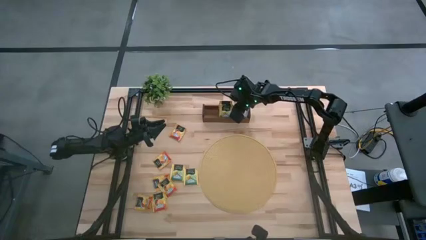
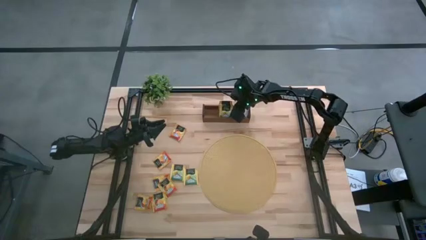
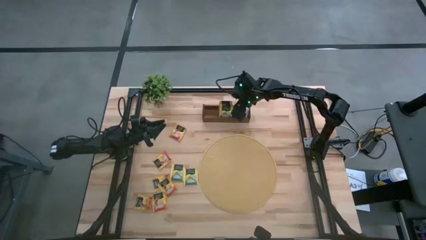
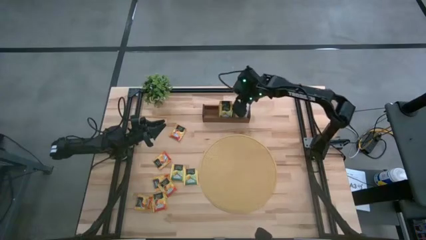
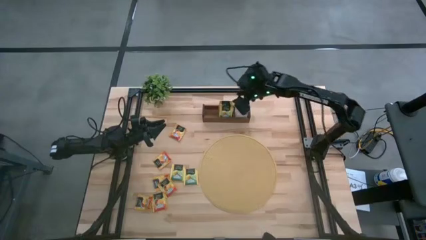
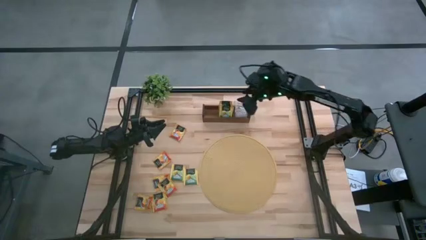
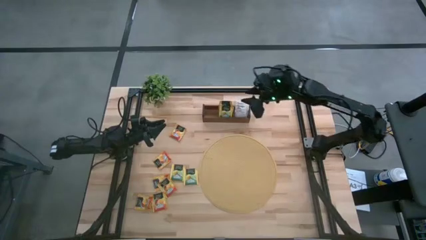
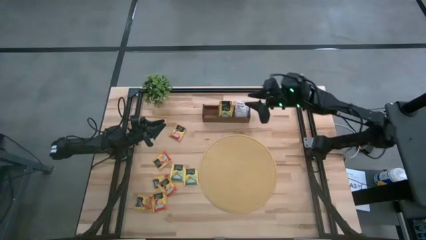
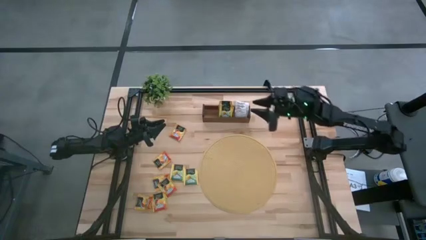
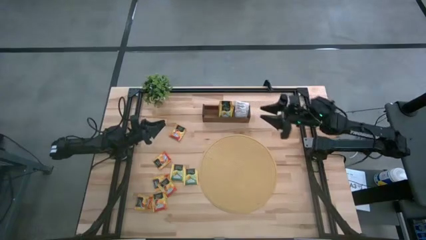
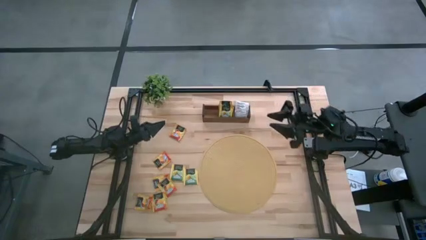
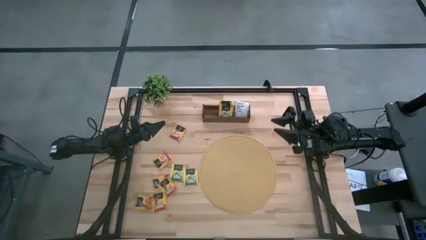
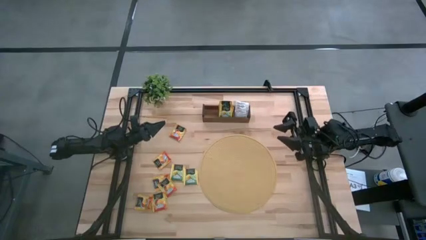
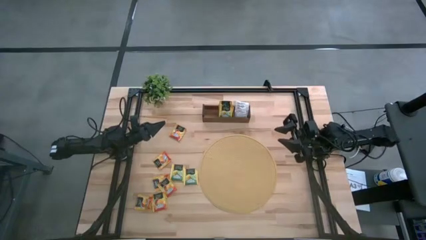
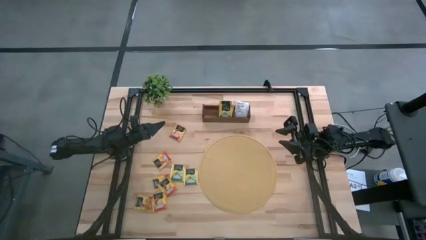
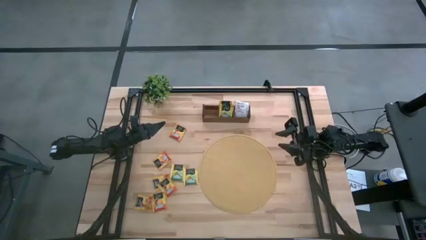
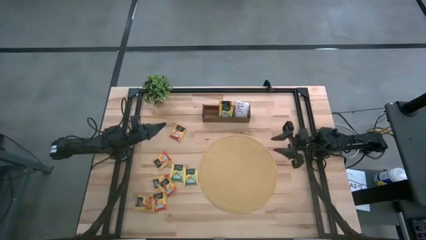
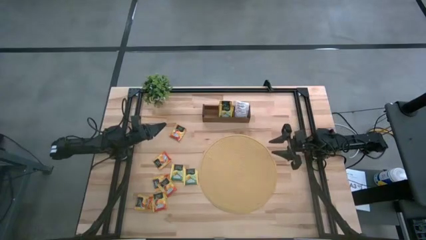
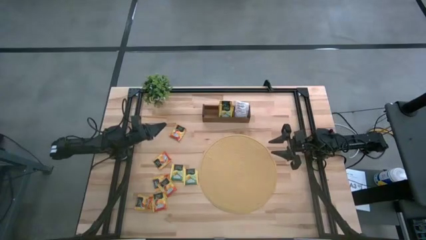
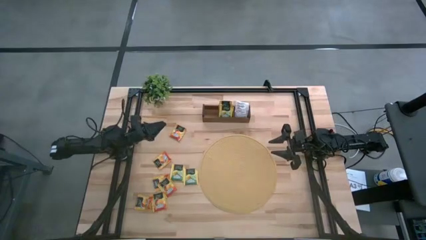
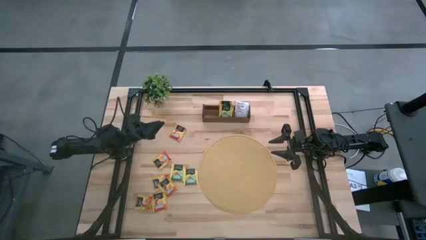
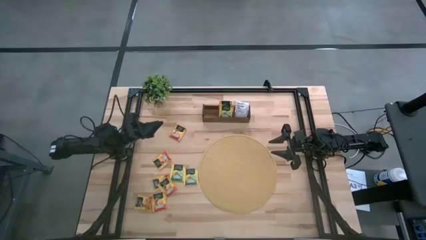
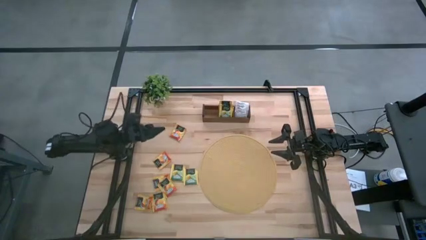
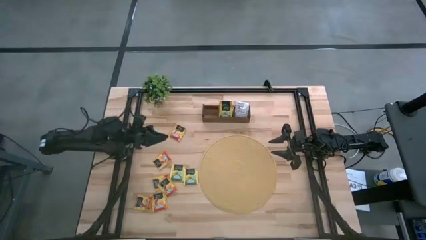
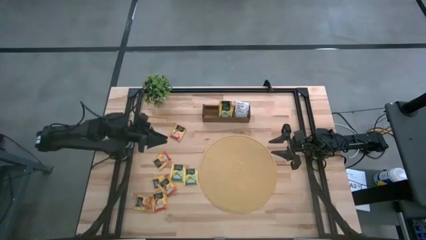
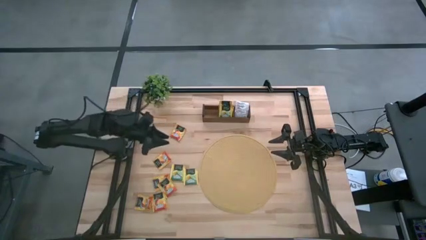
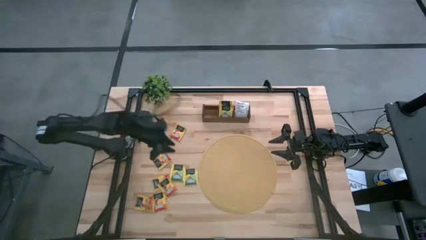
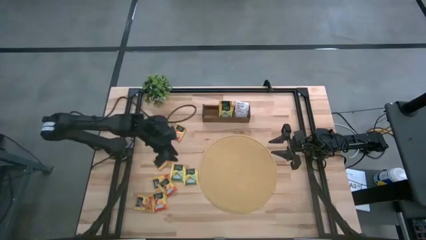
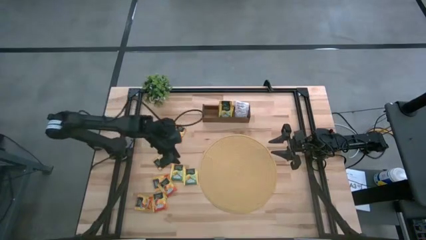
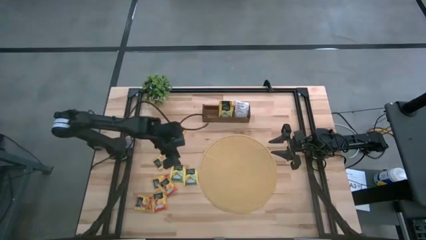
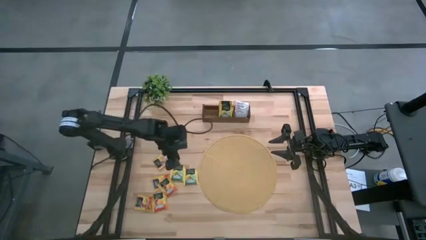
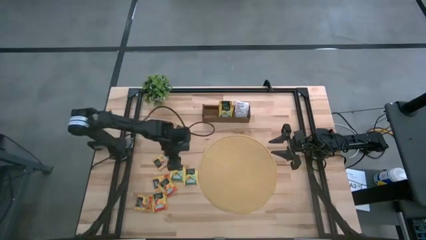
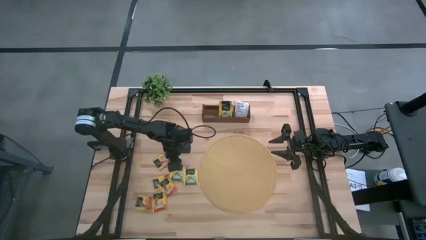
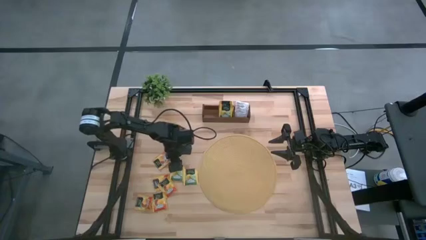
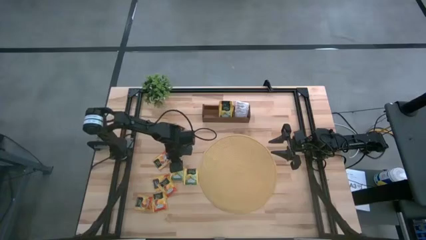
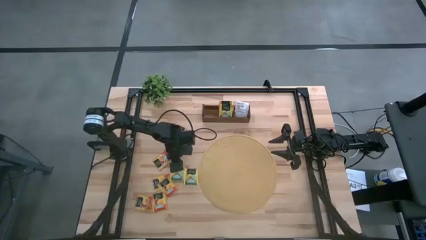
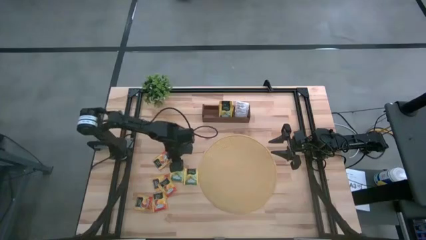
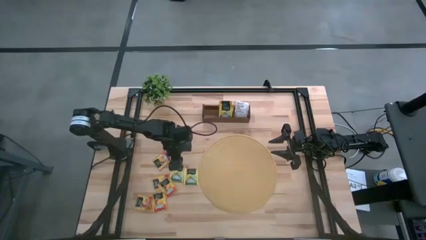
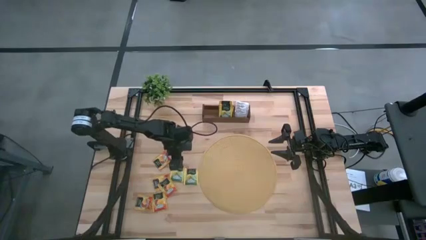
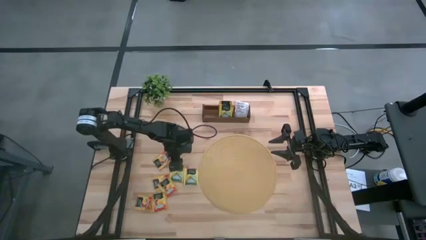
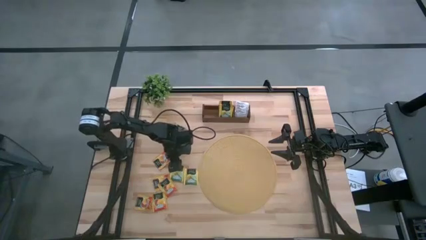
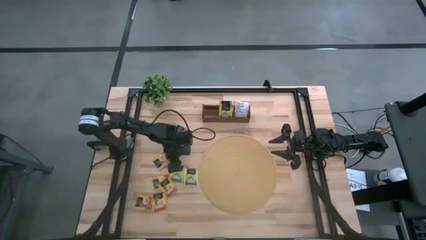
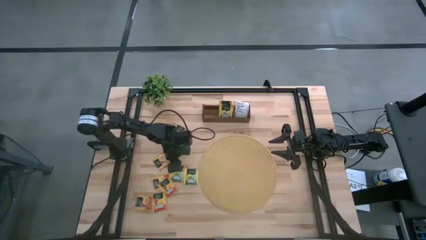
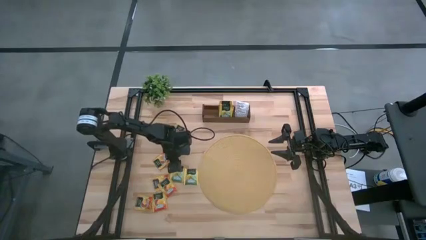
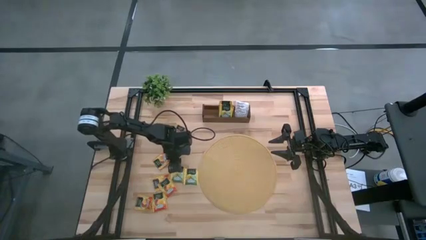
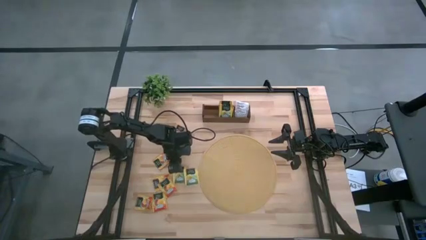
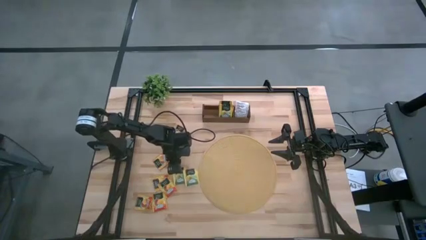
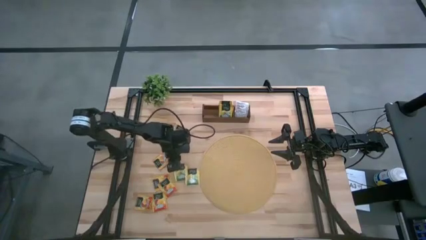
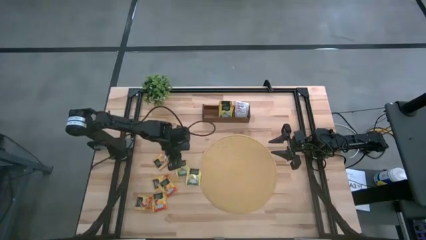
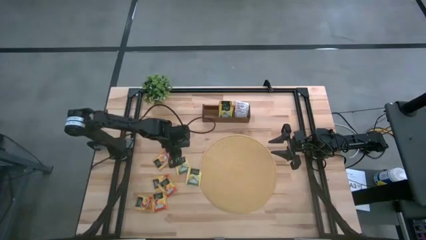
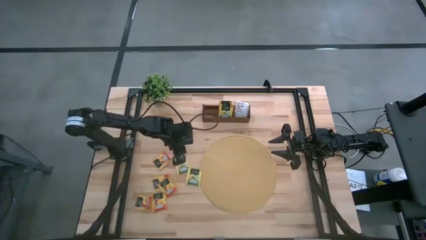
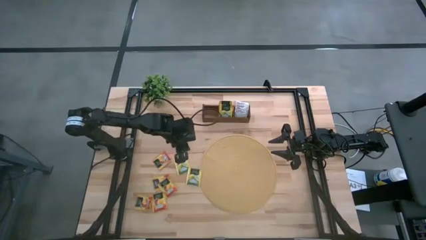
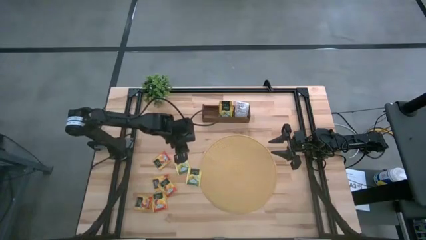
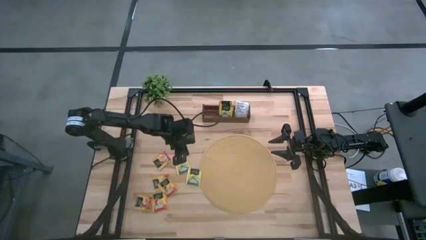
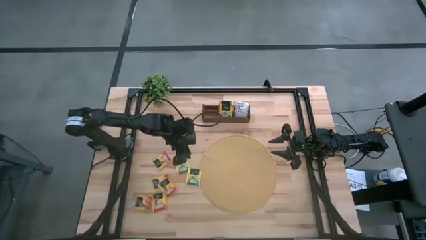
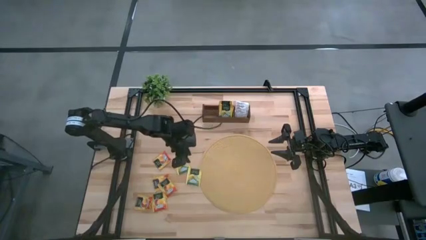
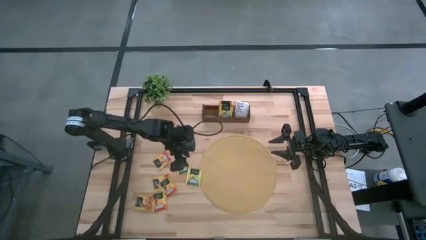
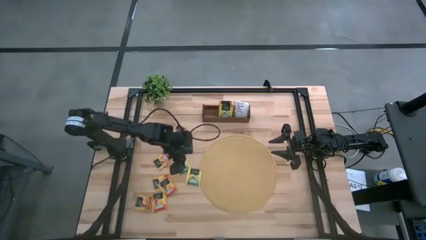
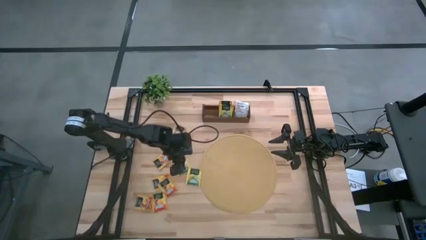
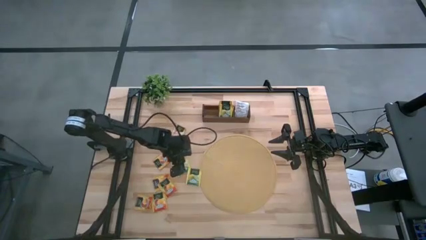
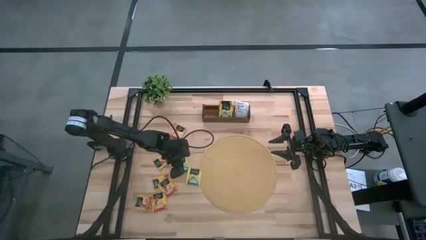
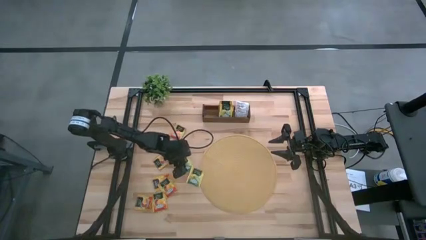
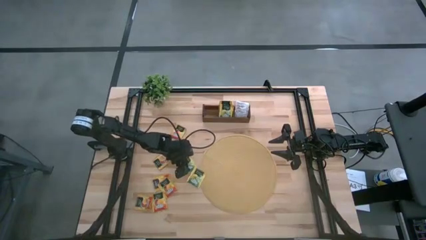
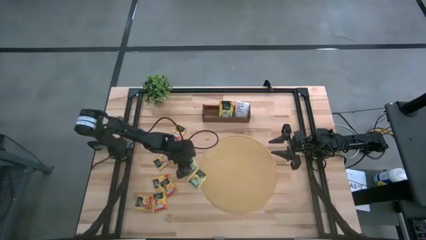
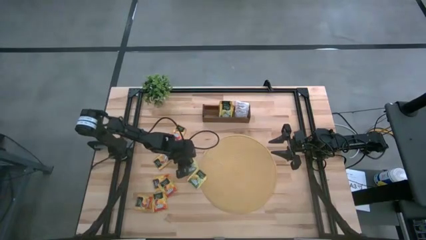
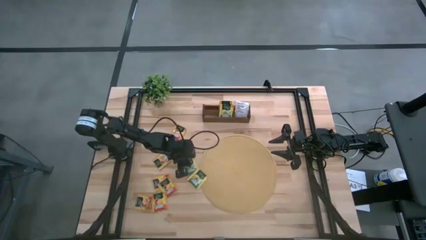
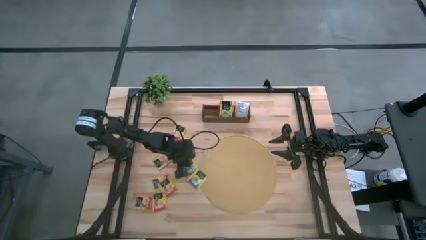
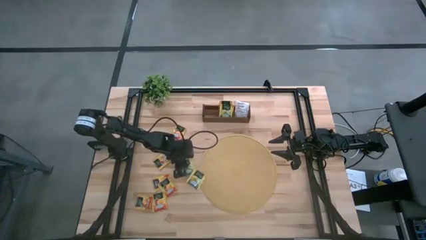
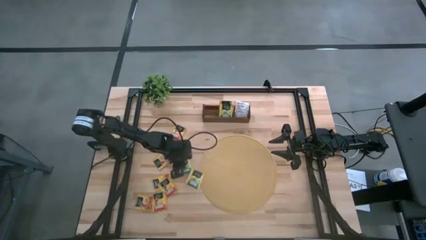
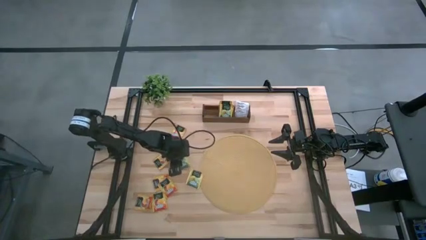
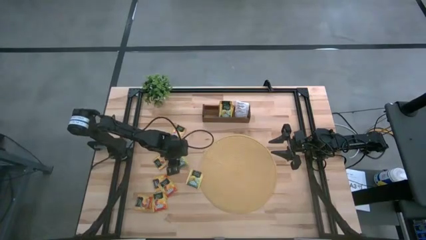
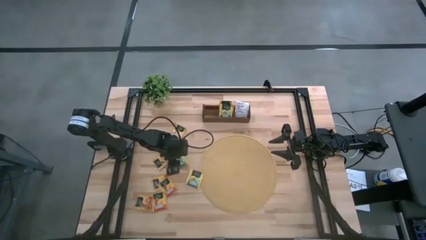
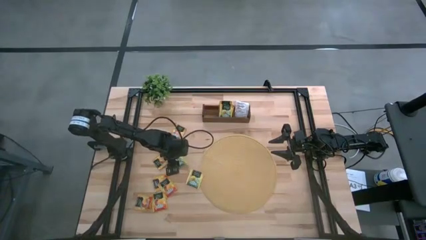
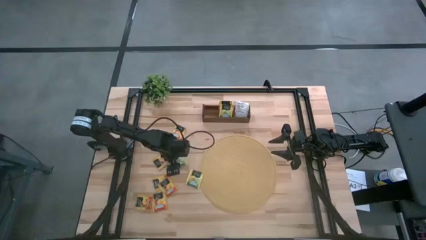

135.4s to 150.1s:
Task: Pick & Place Tea
Put the yellow tea bag into the middle section of the wooden organizer

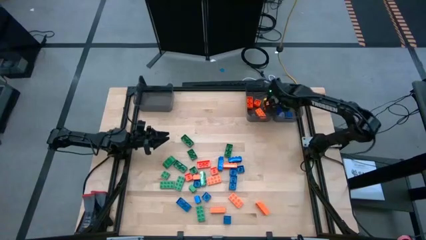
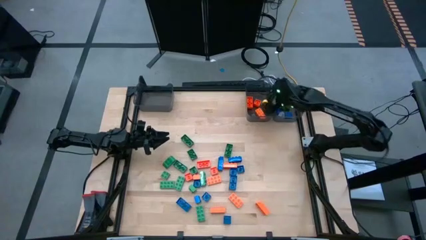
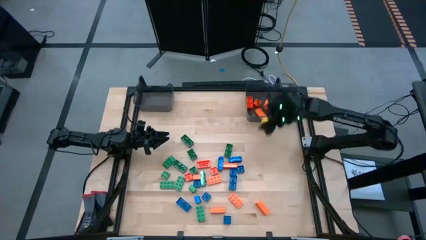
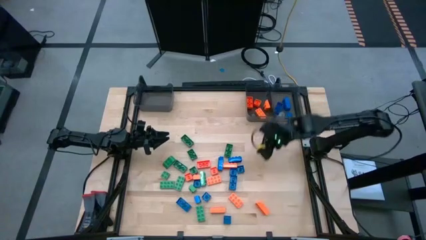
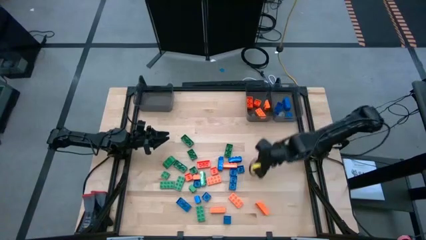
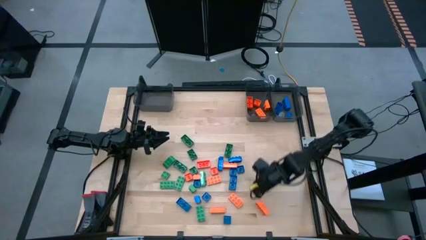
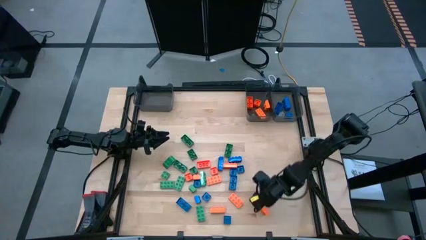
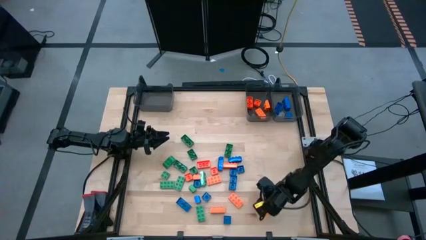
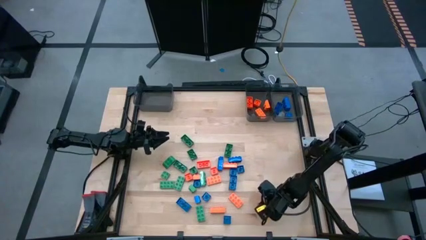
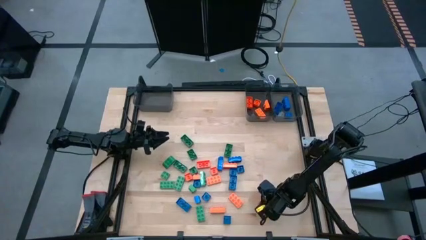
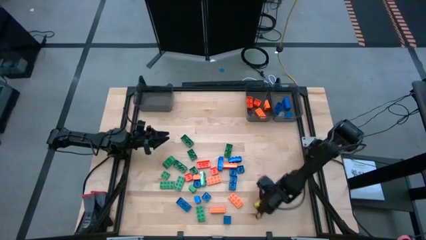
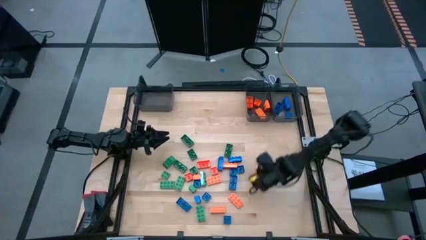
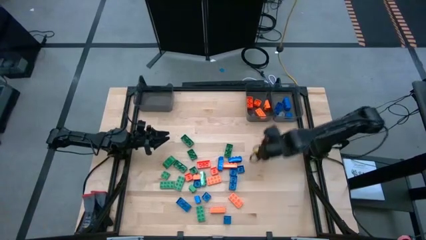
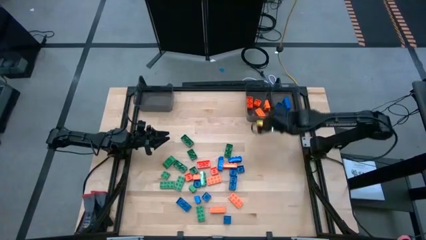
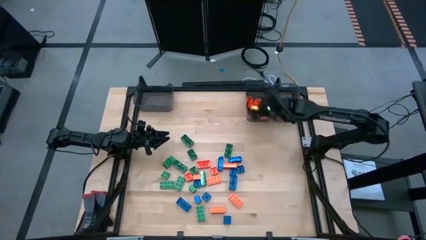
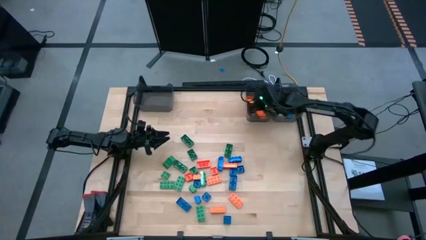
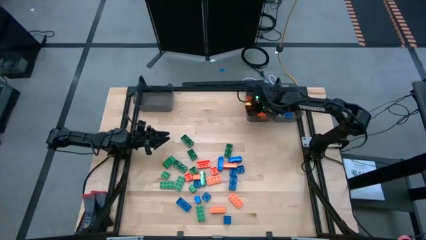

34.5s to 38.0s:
Task: Sort blocks
Put the orange game piece into the middle black bin
